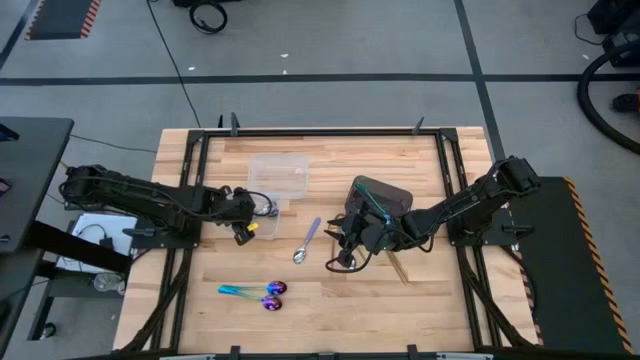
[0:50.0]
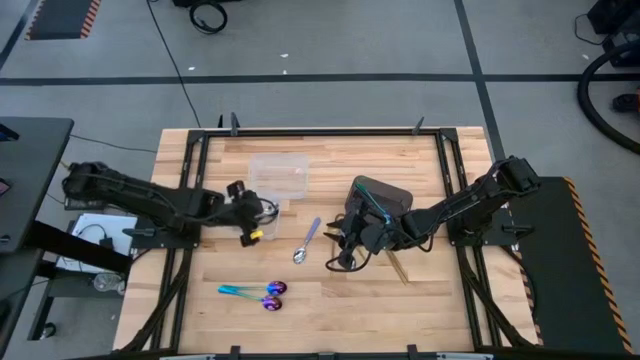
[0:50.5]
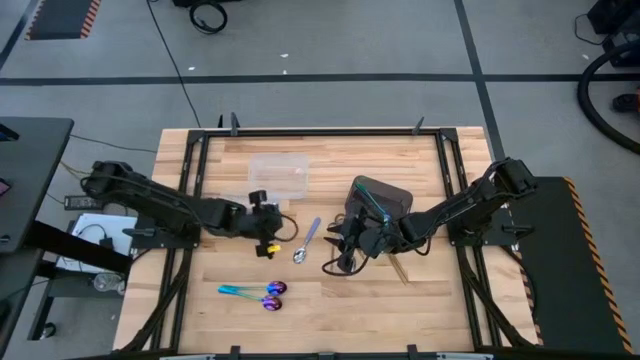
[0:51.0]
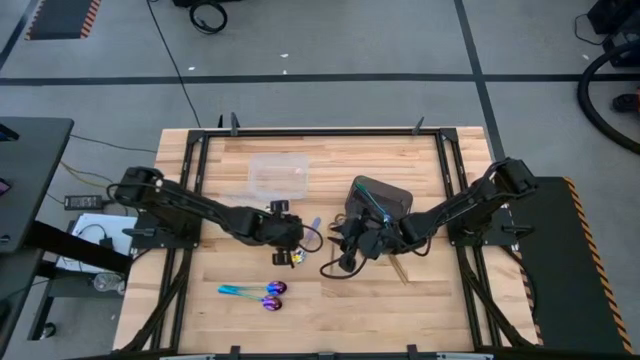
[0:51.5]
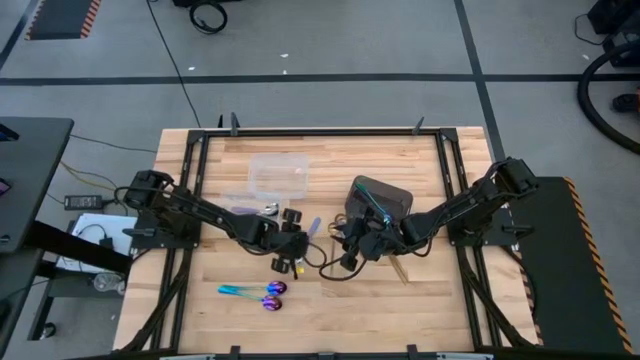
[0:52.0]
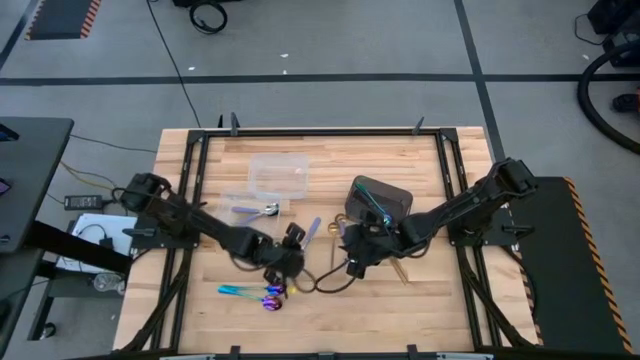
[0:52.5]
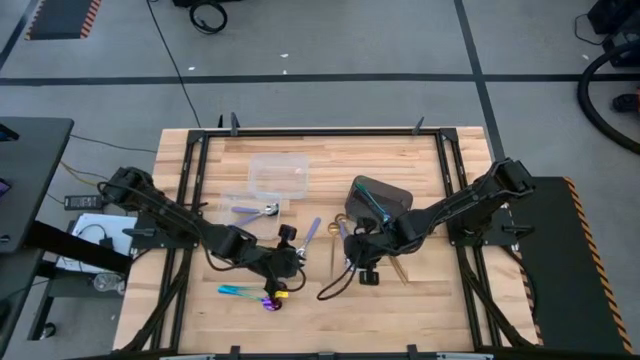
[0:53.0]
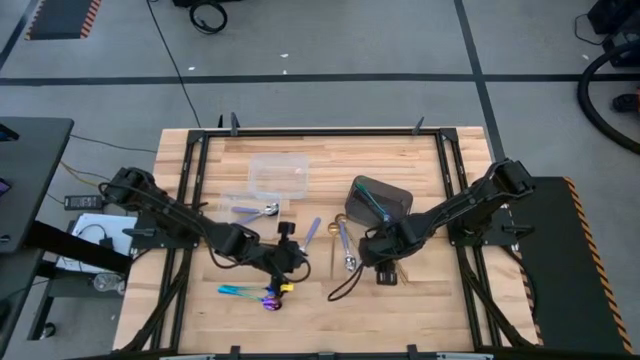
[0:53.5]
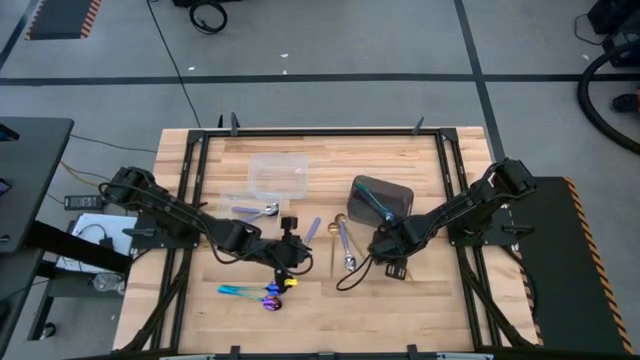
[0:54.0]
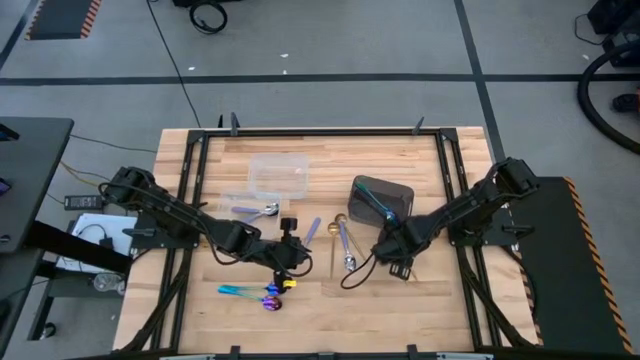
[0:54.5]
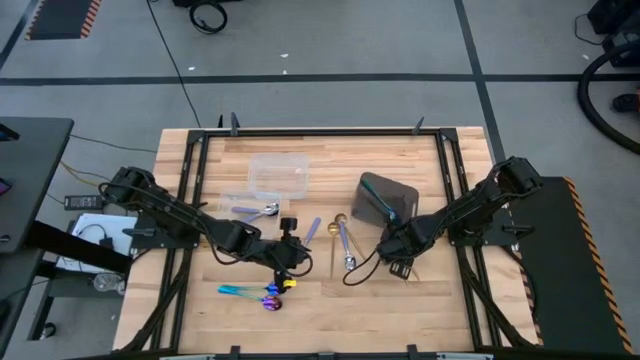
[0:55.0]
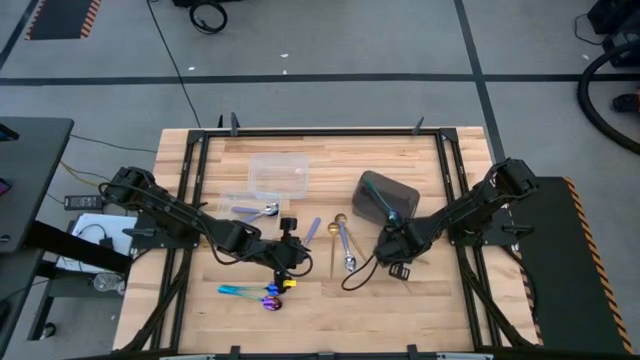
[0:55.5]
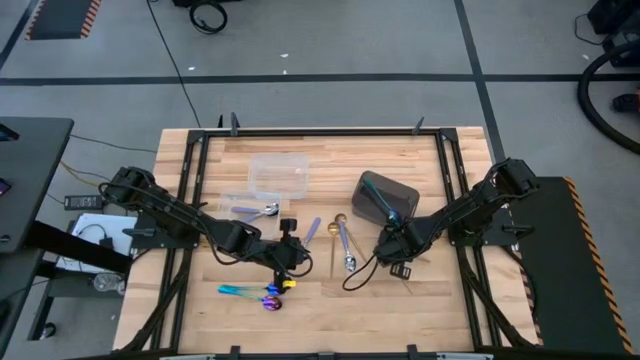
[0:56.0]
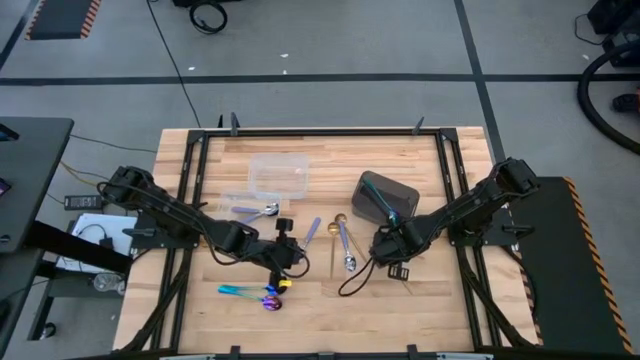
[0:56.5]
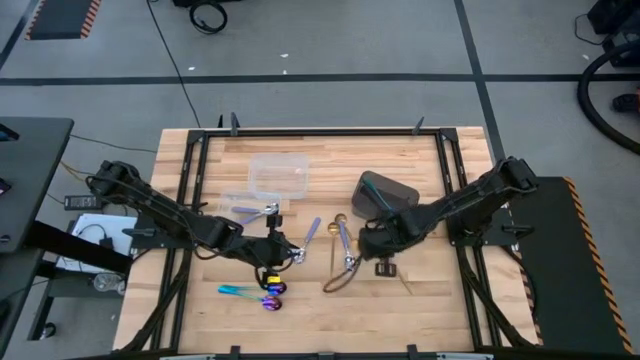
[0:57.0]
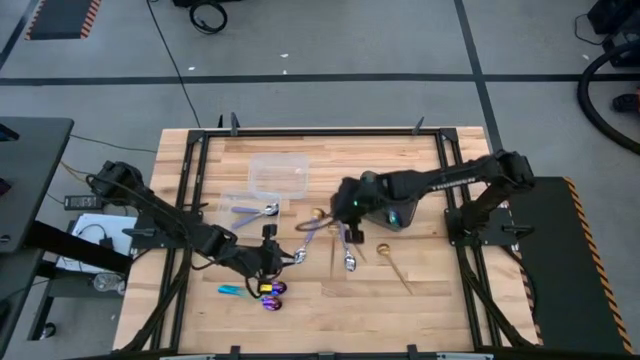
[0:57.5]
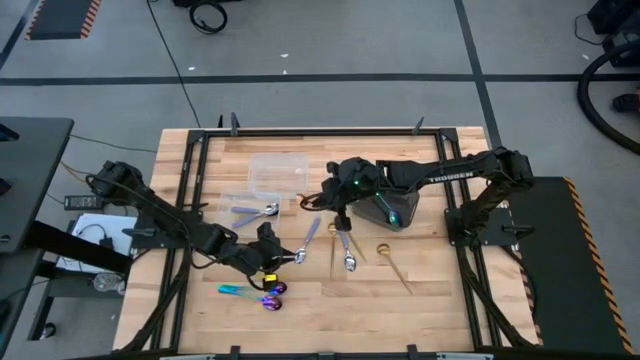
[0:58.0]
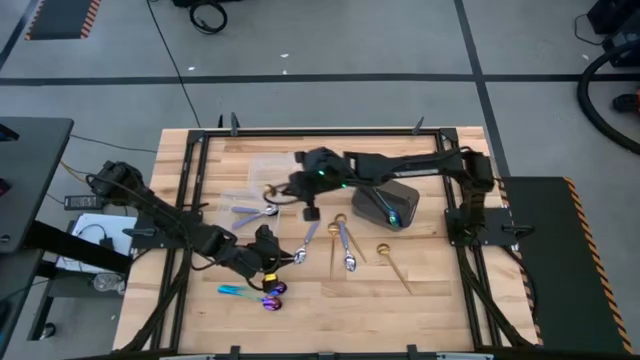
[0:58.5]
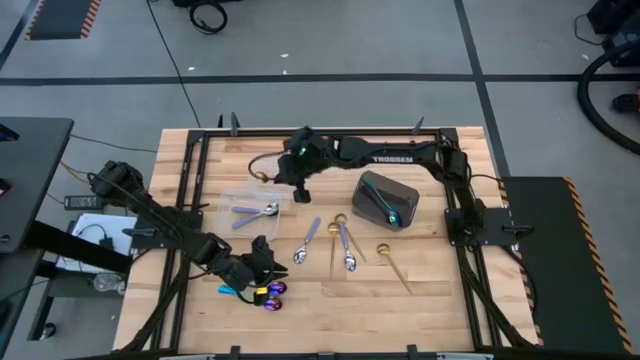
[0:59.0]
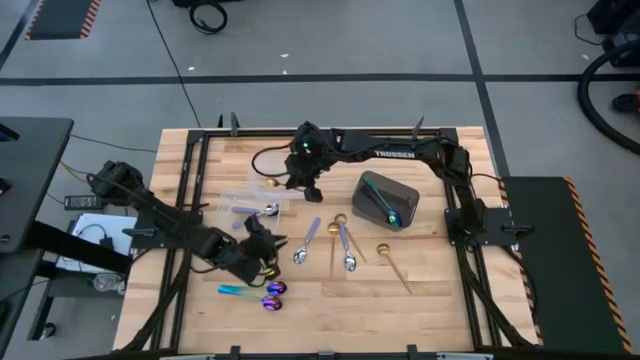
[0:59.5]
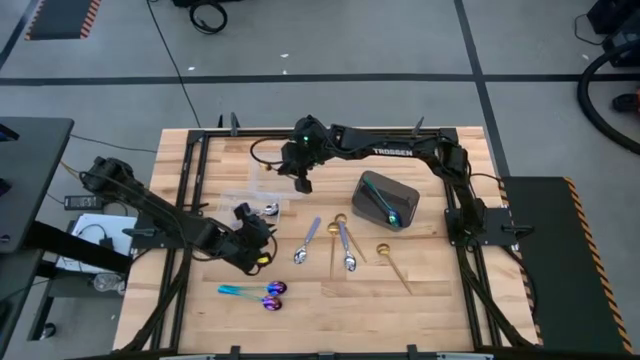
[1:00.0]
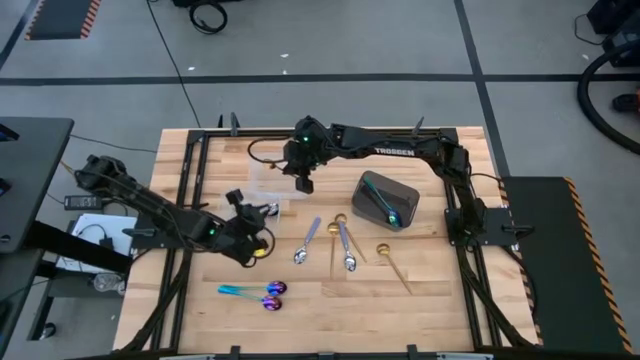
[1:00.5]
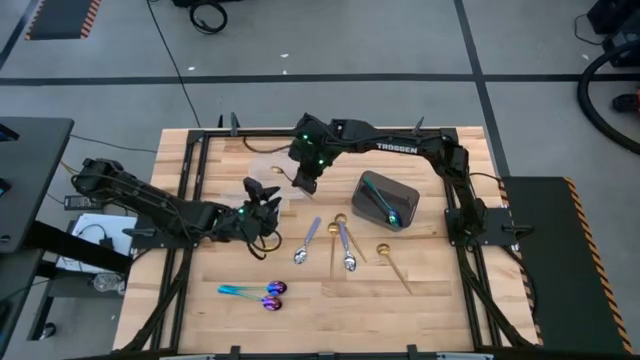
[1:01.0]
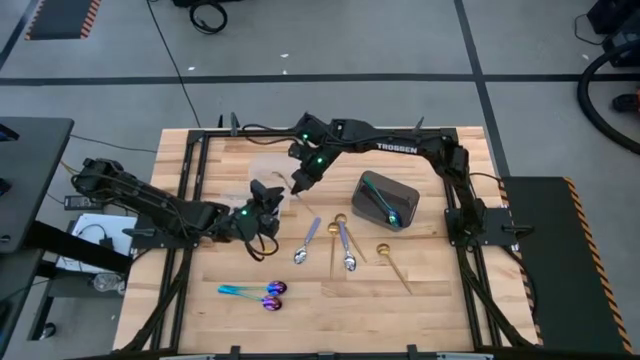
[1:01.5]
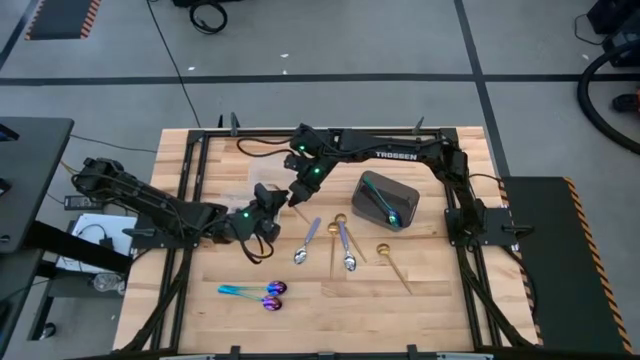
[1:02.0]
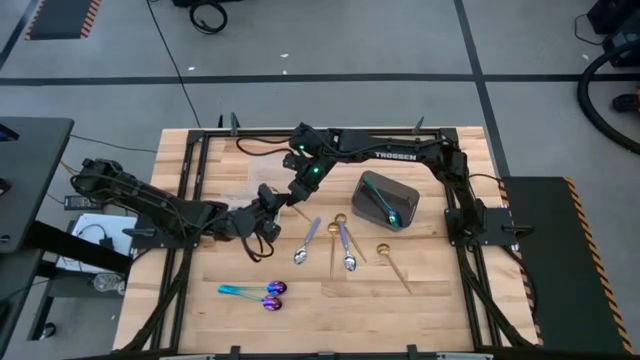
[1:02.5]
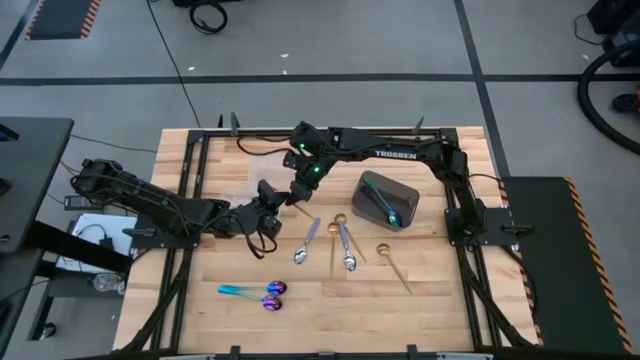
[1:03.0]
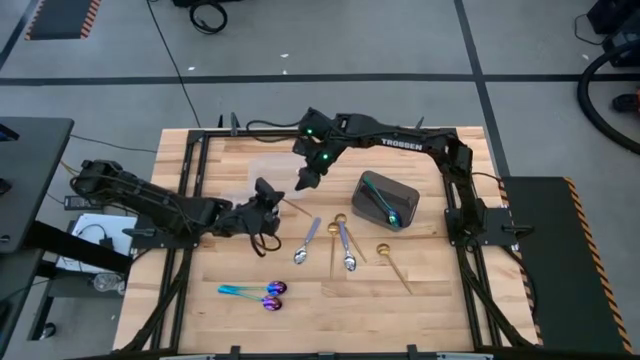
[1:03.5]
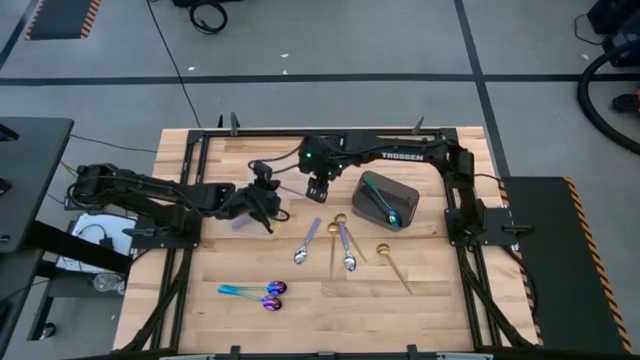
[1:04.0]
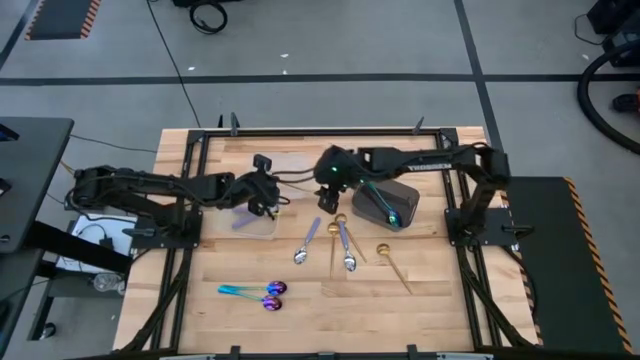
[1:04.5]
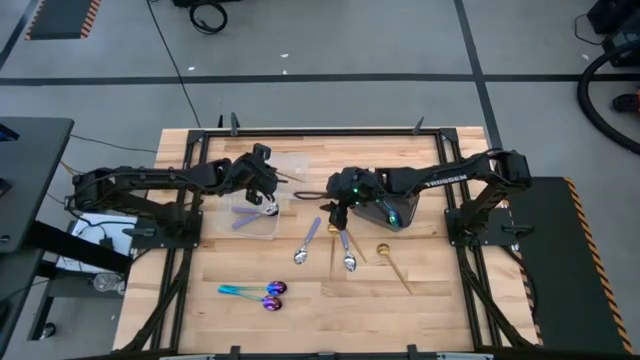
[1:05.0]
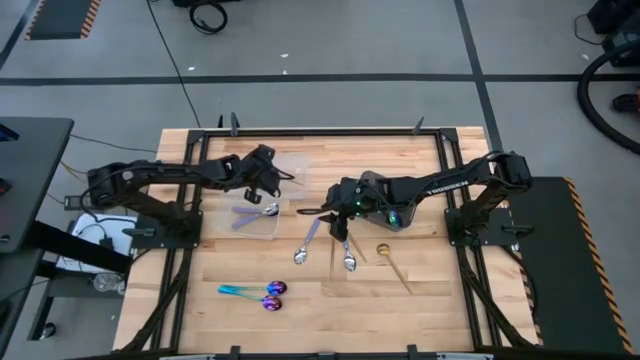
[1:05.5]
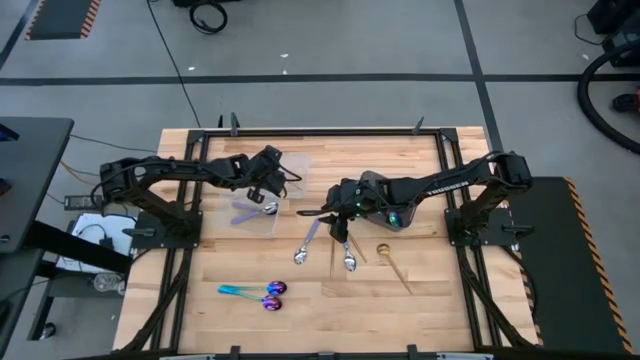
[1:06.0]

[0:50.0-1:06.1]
Task: Sort silverware by color (type)
Put the gold spoon into the top transparent bin

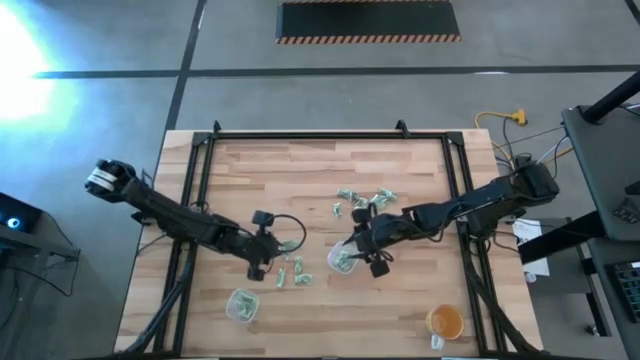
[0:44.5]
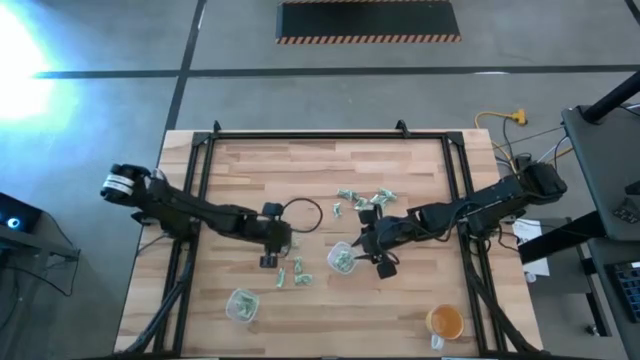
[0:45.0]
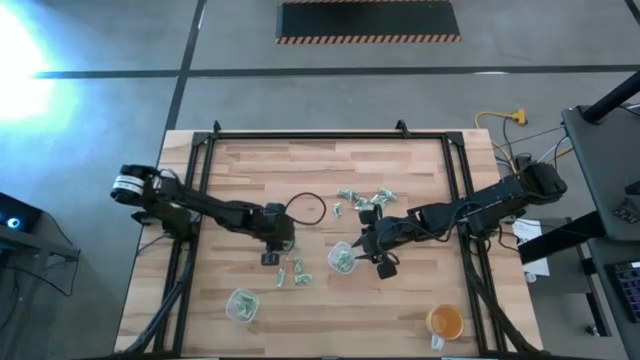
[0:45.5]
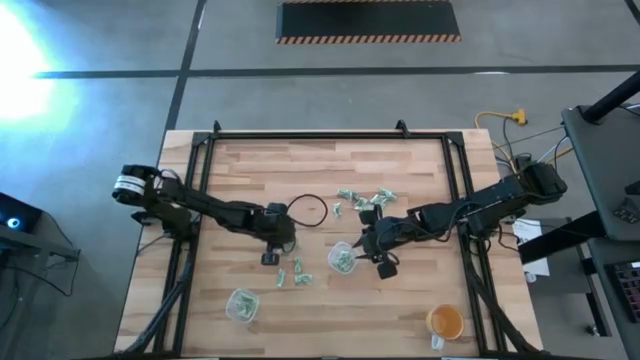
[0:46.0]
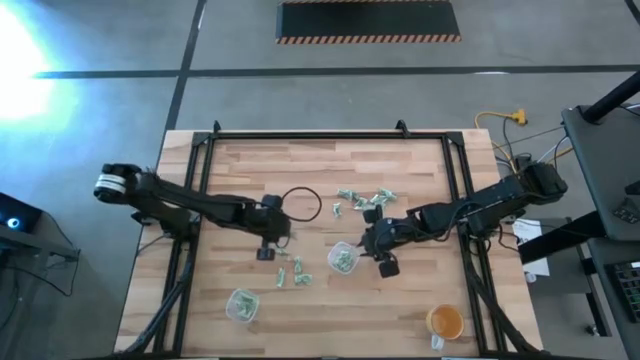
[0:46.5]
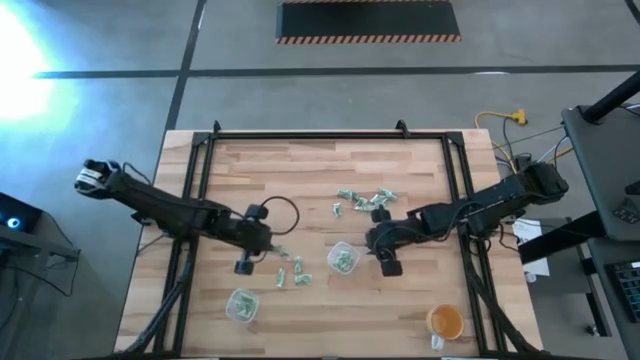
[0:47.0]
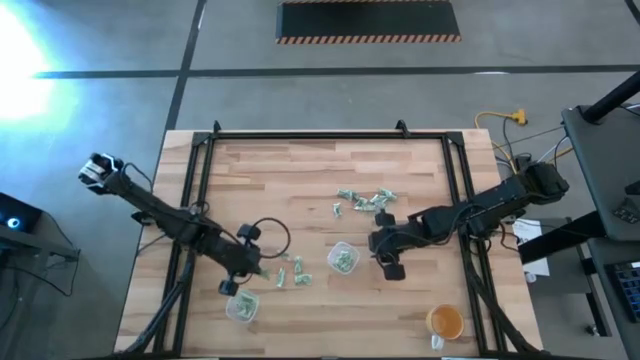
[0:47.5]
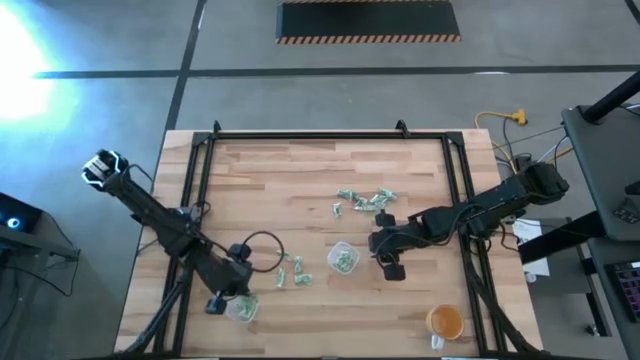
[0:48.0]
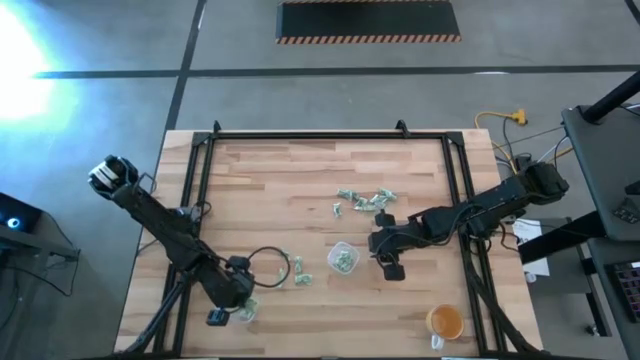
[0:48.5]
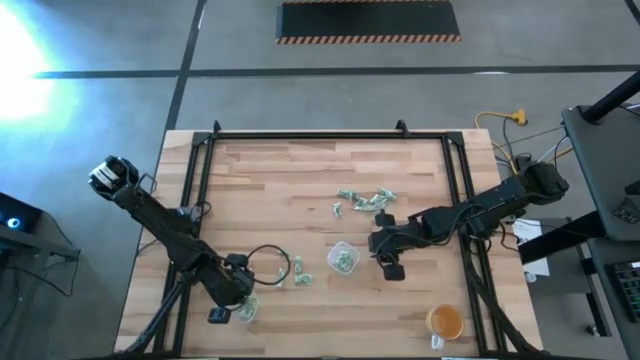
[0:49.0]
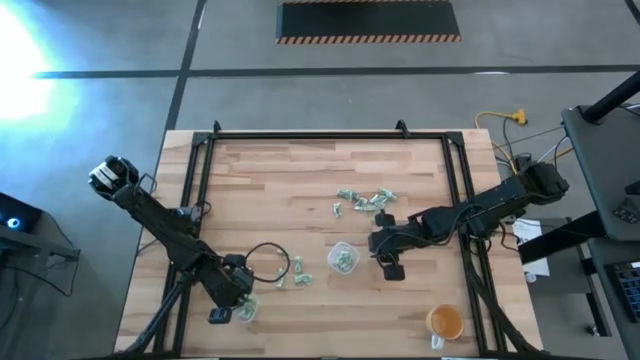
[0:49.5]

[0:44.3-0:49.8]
Task: Pick and place items into bin
Put the light green packet into the bottom transparent bin
